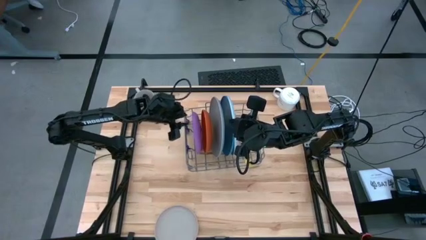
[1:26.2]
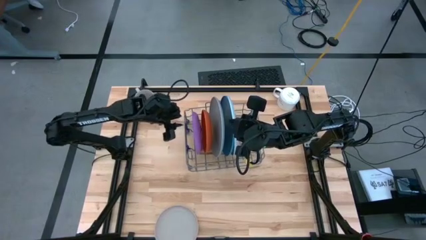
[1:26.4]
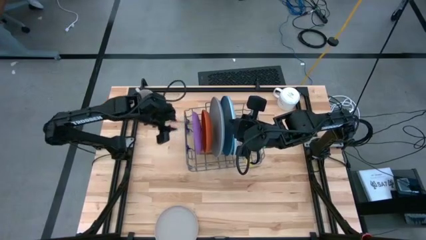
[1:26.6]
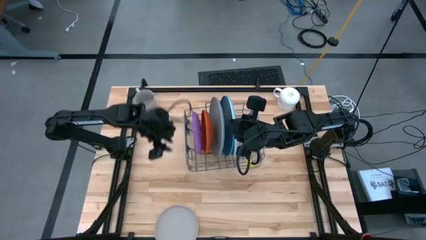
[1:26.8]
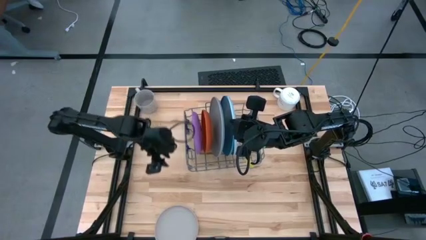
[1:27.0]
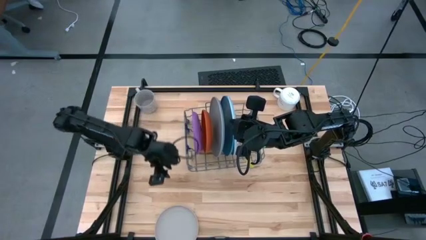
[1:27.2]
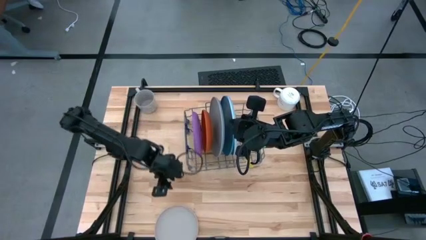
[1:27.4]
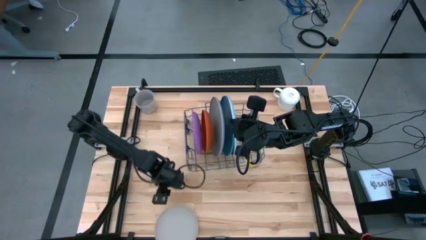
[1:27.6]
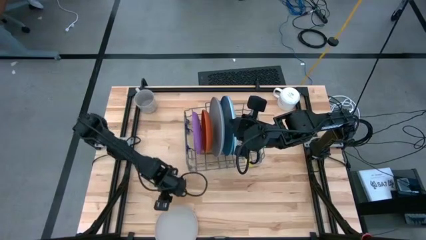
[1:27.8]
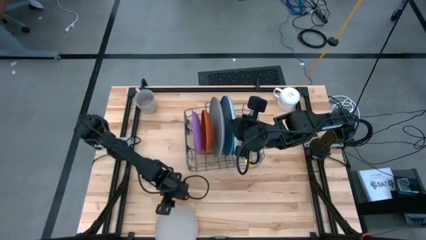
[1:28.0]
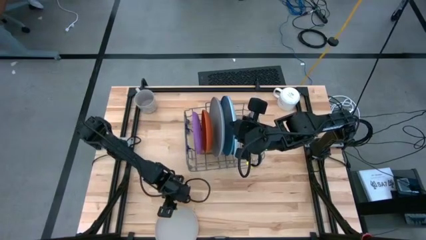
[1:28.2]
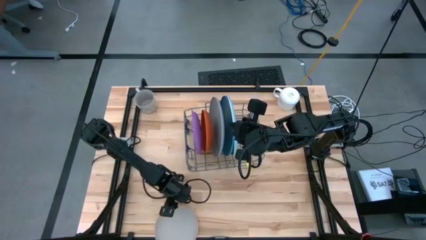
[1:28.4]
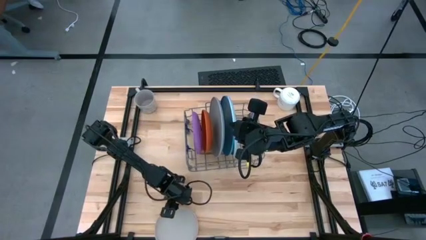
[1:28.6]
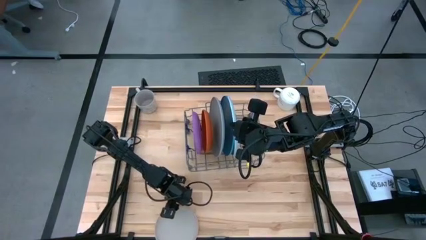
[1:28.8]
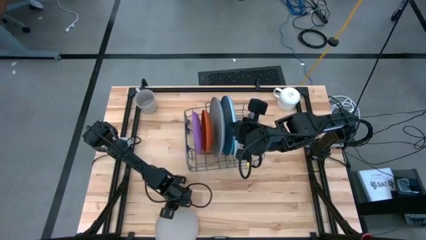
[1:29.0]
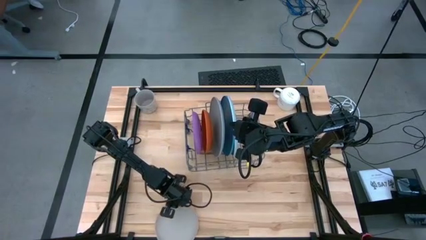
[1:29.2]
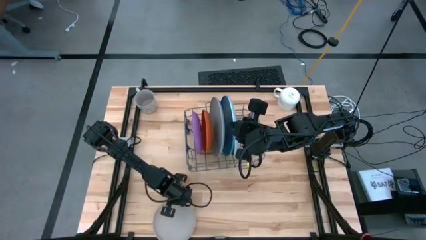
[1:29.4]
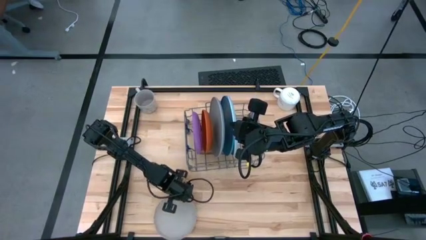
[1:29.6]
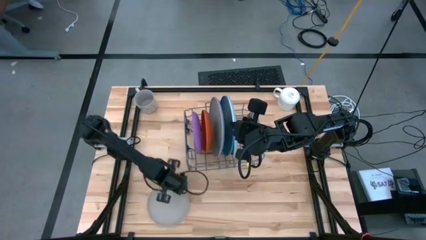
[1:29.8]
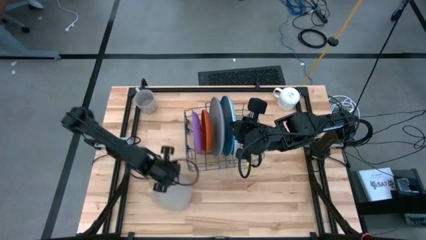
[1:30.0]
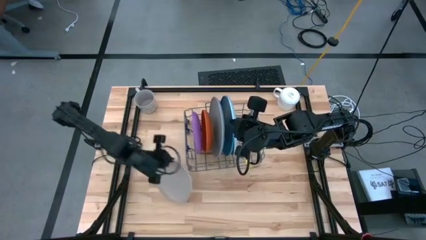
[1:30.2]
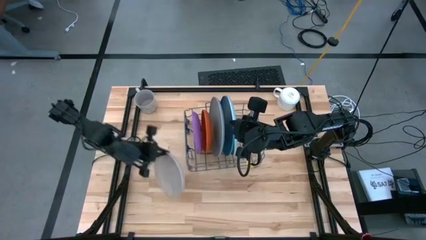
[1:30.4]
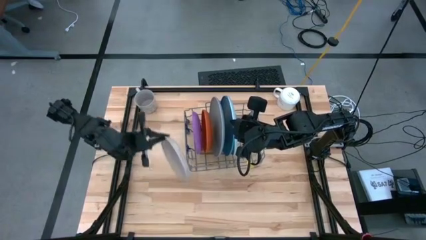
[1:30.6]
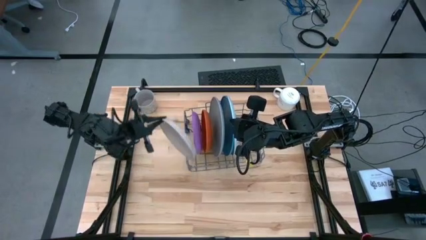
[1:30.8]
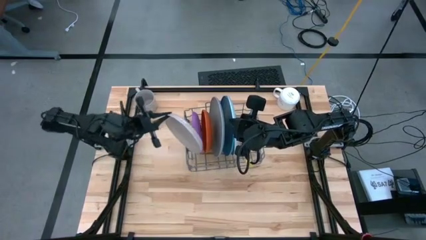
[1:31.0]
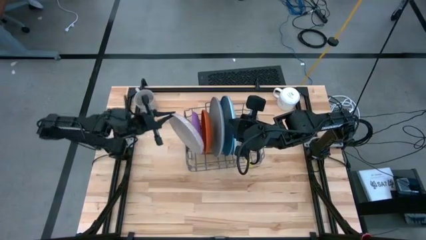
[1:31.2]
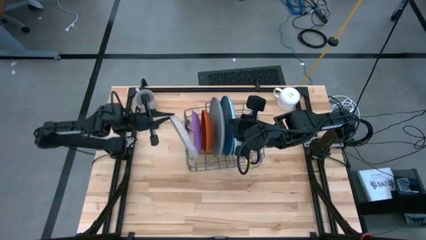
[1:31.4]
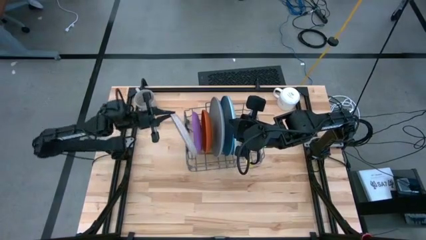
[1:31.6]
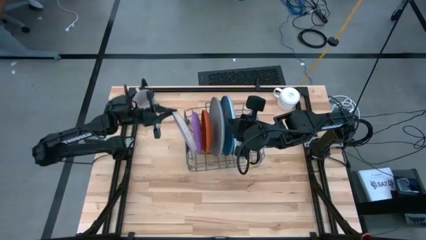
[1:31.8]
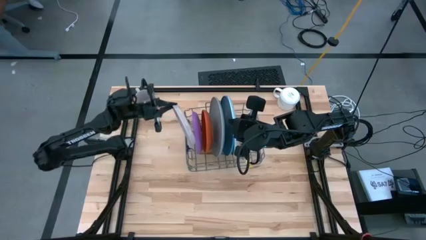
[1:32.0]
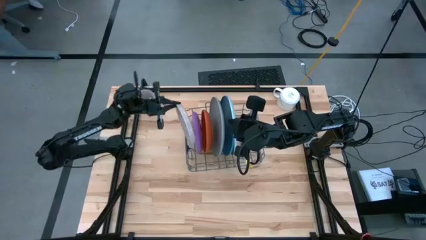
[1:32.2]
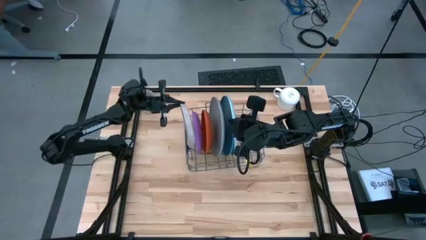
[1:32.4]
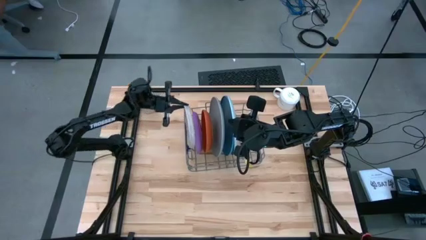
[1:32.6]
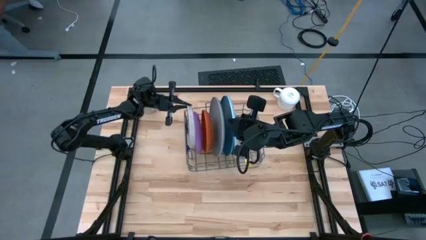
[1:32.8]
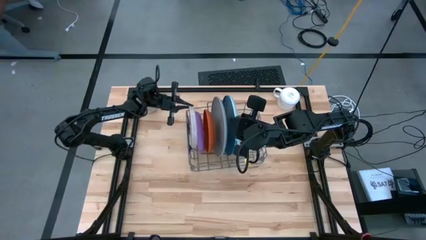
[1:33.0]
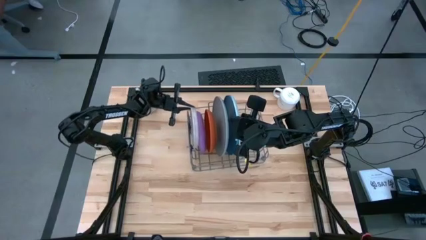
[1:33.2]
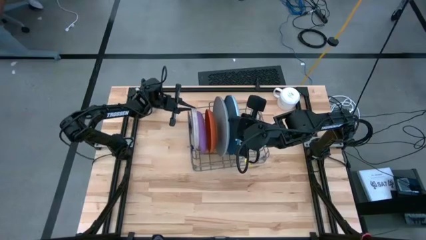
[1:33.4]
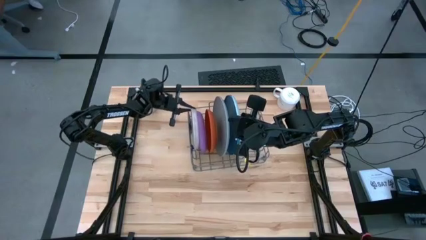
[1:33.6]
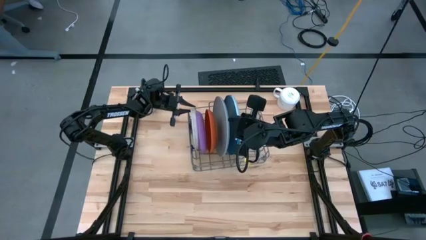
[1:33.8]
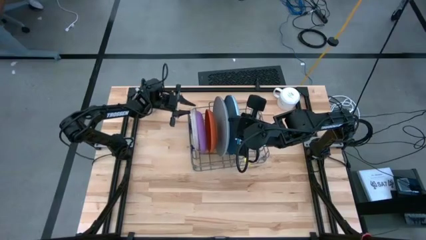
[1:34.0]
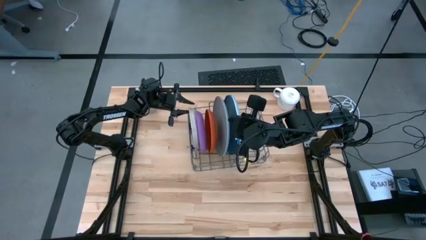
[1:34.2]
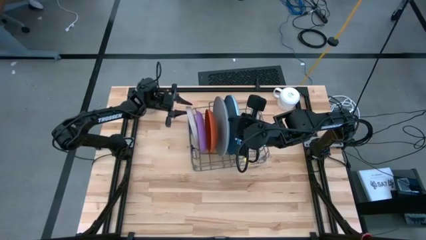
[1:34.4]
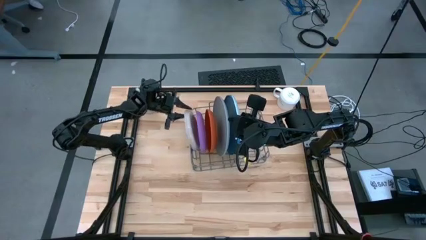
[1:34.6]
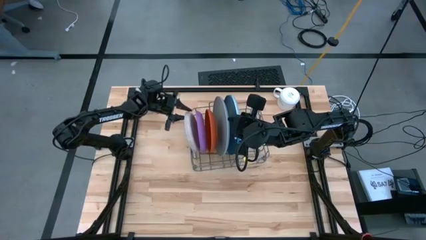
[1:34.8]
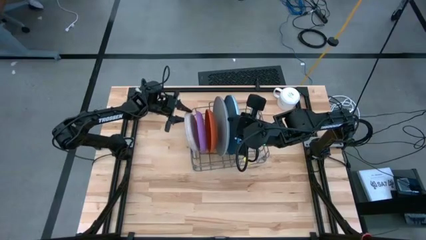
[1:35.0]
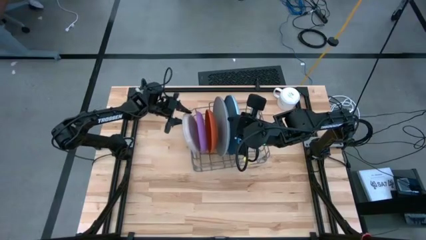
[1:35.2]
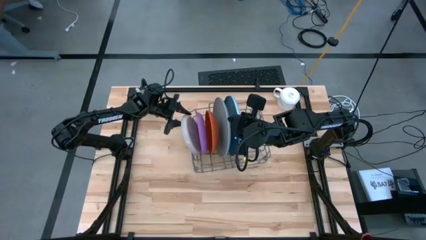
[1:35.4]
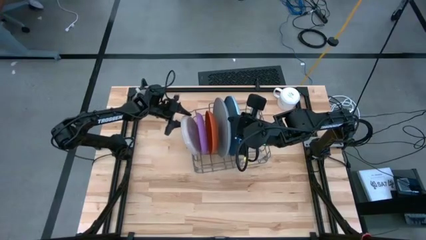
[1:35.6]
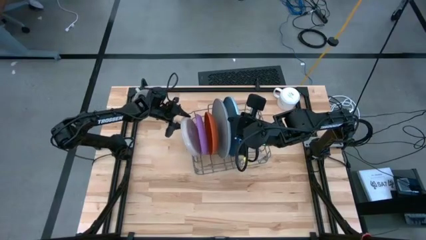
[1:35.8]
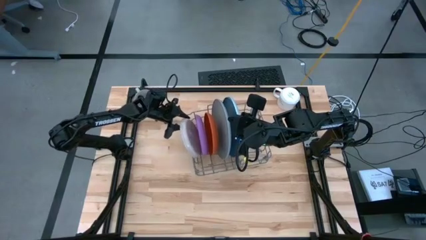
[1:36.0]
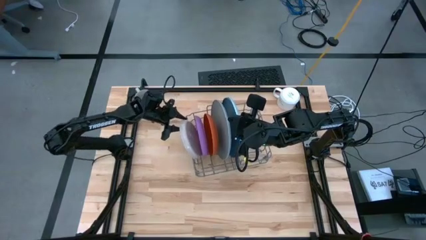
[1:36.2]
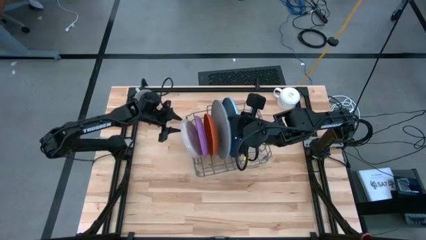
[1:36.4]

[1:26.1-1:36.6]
Task: Sort dishes
Put the white plate in the dish rack

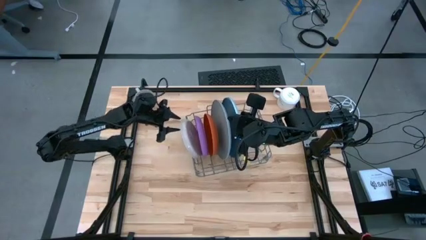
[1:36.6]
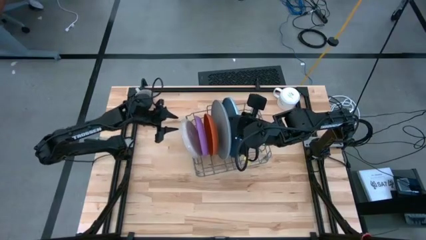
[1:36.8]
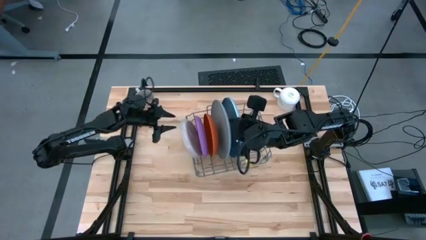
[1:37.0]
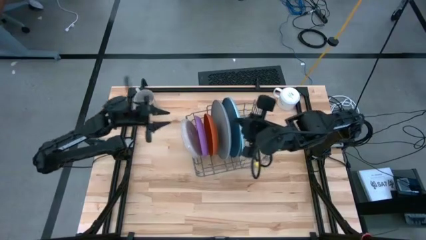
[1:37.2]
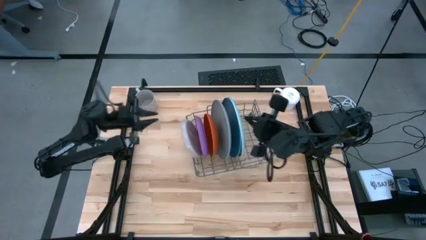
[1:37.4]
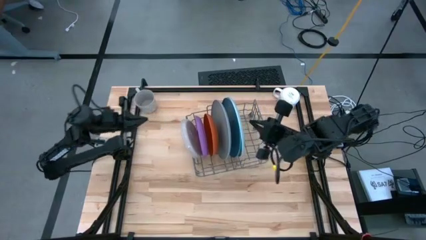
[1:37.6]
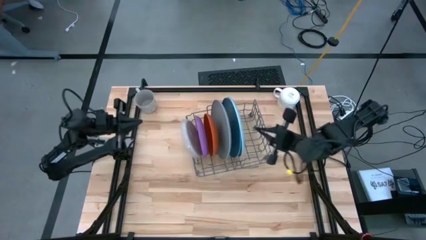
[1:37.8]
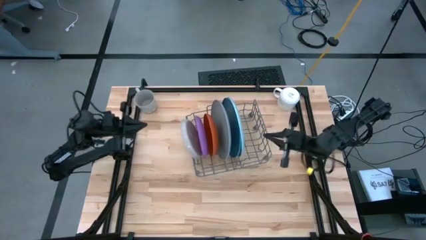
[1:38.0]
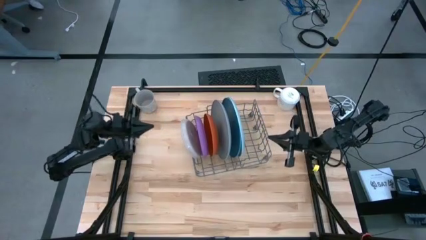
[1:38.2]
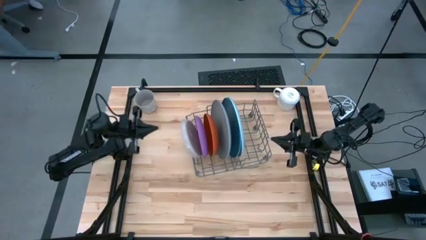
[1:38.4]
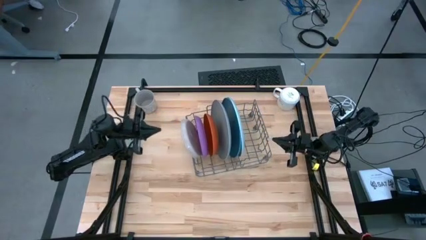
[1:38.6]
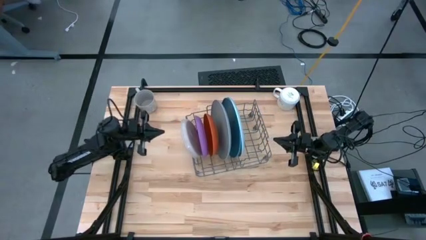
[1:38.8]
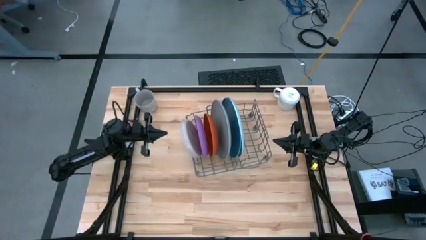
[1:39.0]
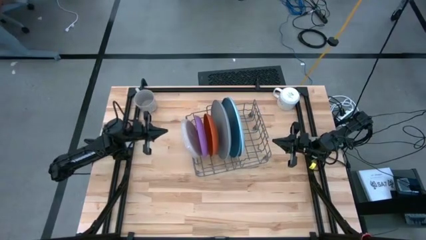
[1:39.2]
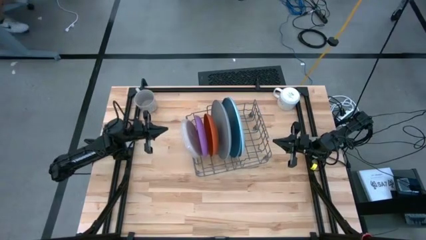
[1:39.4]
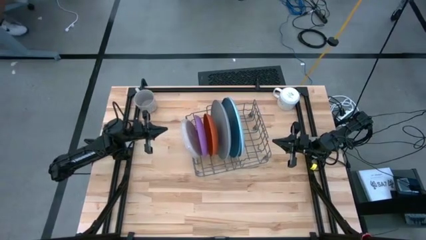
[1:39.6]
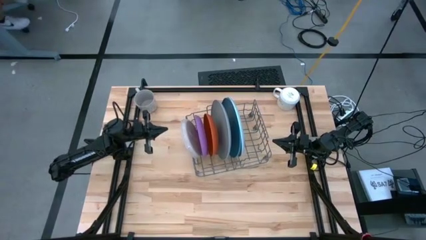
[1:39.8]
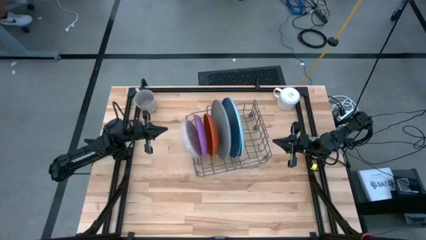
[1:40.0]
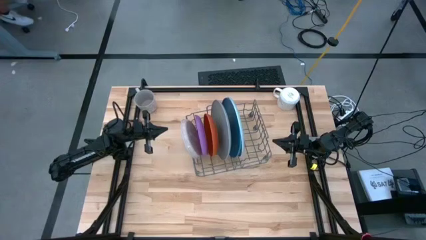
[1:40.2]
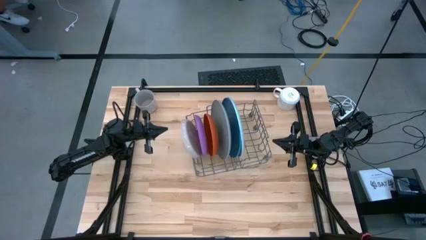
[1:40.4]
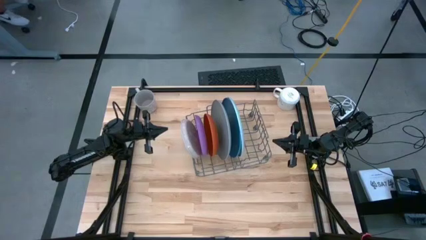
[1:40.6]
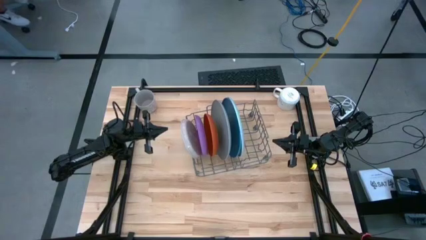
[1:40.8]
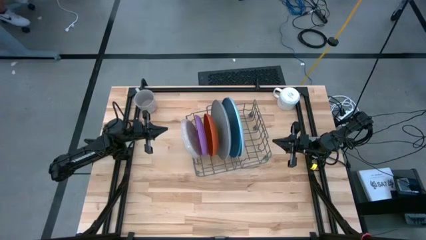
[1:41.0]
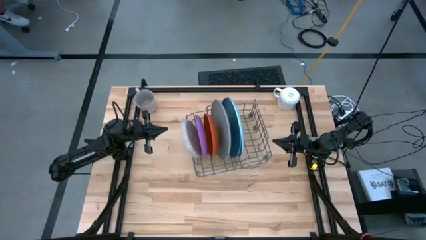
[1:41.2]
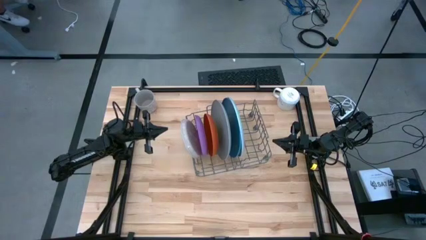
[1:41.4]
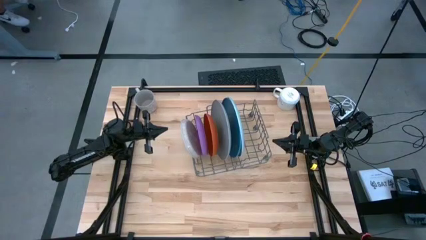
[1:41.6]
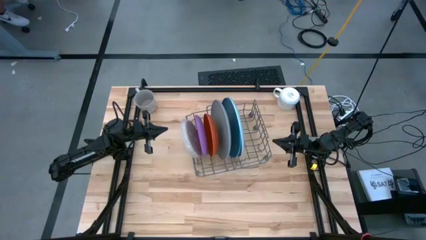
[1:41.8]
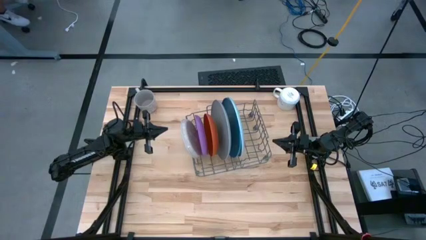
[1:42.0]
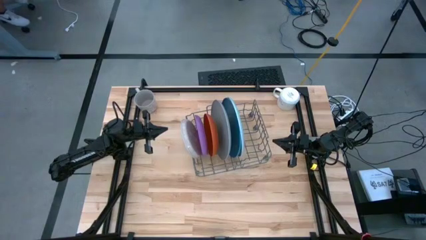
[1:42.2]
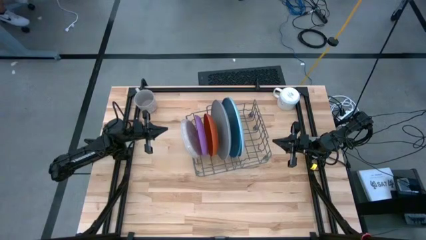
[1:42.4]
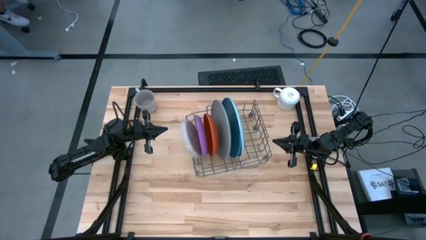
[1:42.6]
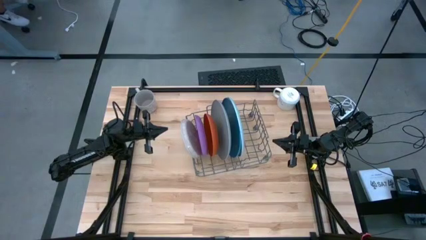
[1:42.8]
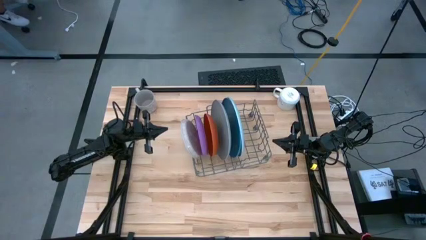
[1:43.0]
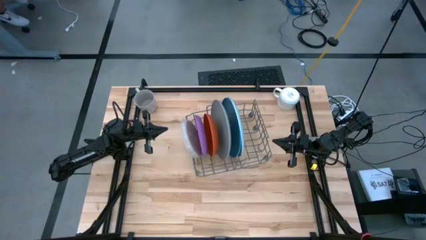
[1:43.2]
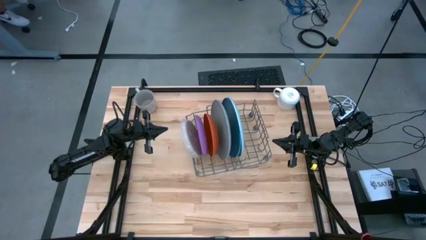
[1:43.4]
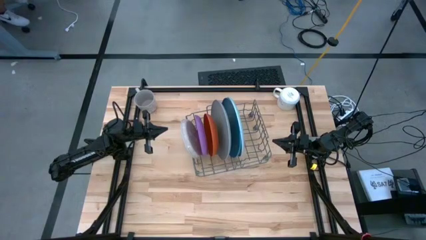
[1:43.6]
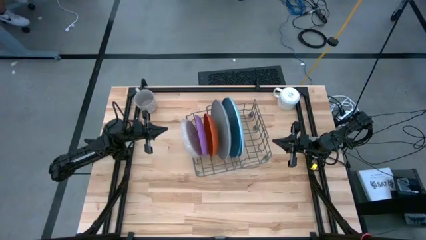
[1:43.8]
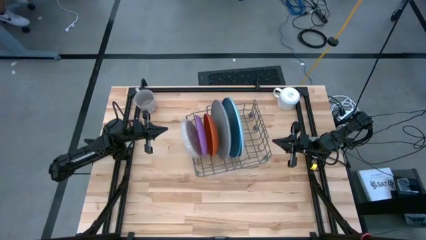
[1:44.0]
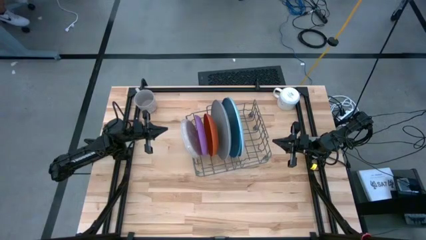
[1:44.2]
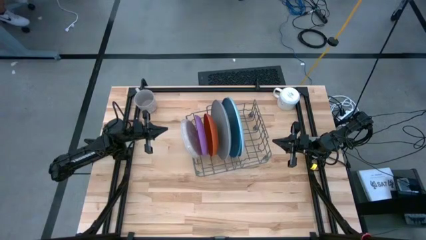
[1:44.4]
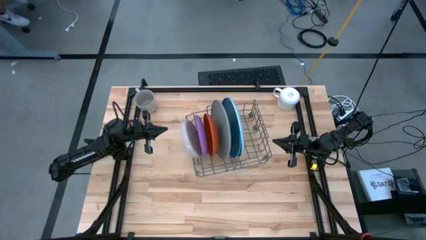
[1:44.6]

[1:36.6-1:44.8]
Return to Home Position
